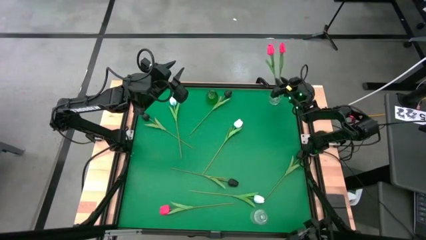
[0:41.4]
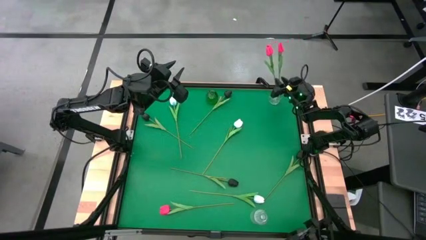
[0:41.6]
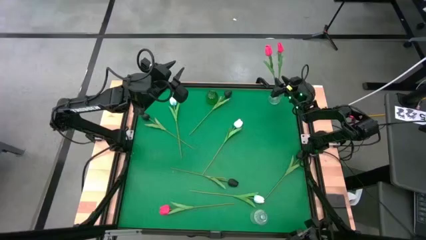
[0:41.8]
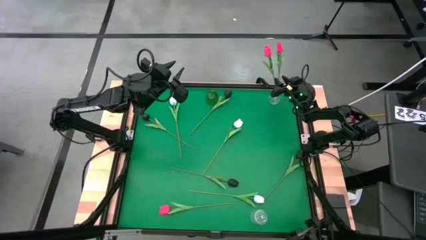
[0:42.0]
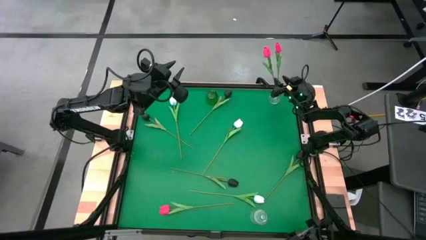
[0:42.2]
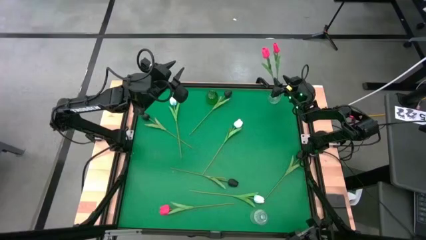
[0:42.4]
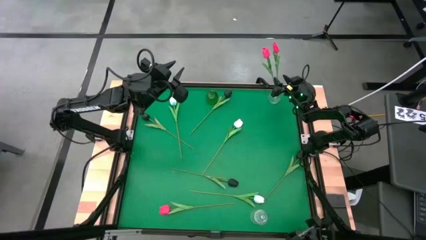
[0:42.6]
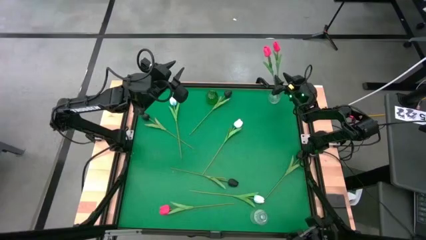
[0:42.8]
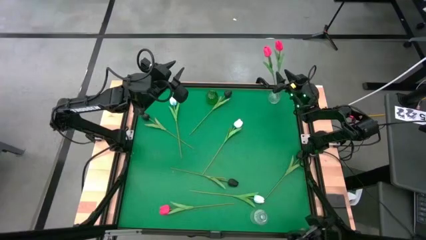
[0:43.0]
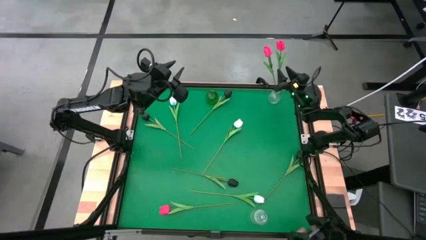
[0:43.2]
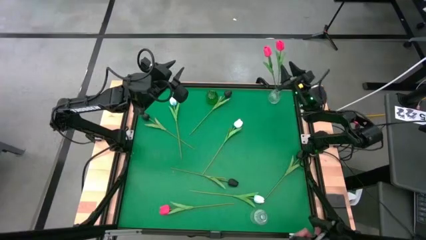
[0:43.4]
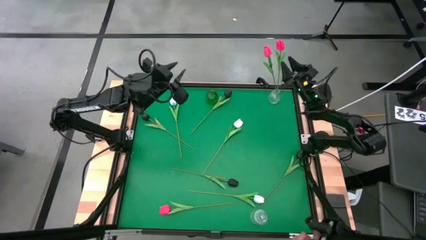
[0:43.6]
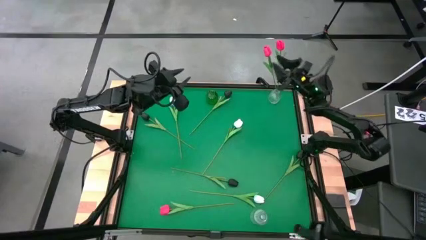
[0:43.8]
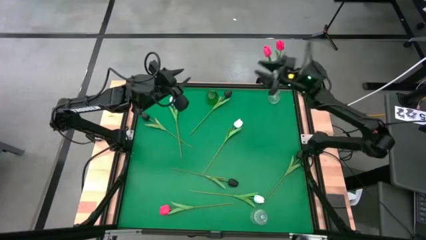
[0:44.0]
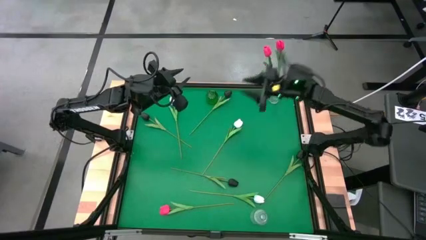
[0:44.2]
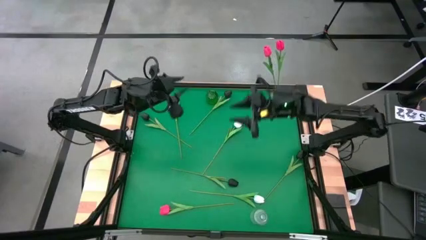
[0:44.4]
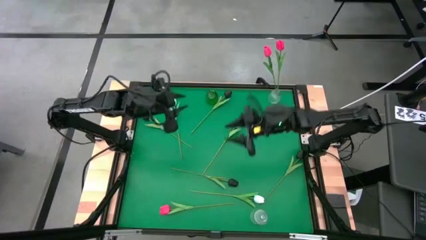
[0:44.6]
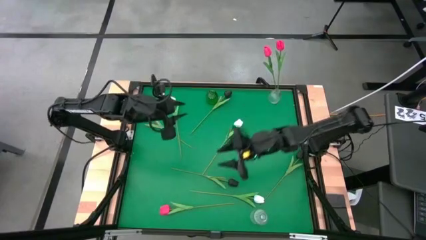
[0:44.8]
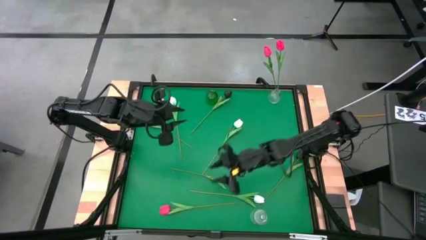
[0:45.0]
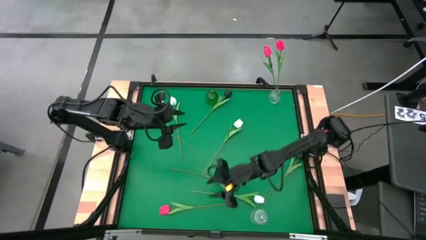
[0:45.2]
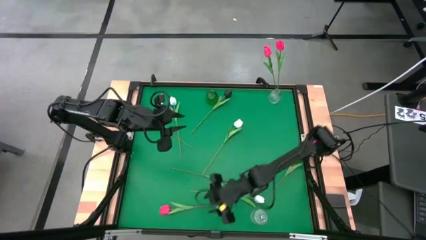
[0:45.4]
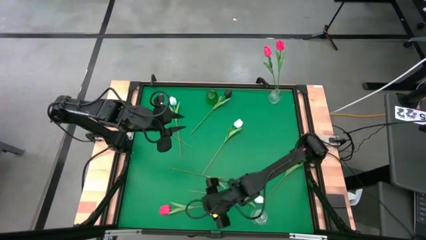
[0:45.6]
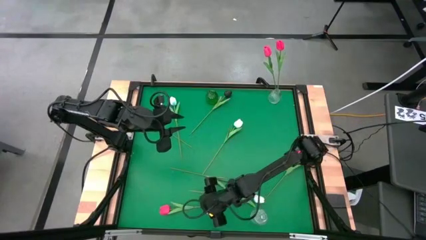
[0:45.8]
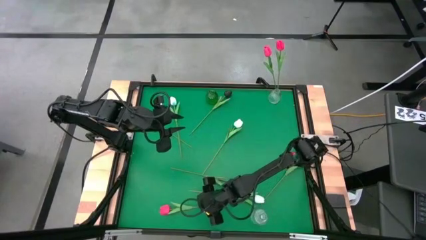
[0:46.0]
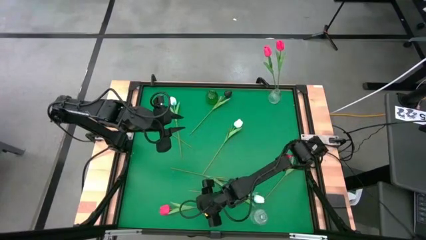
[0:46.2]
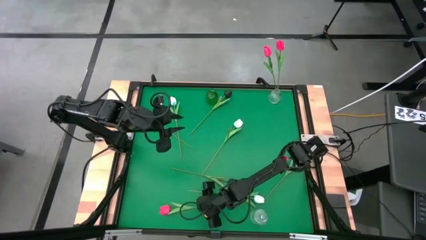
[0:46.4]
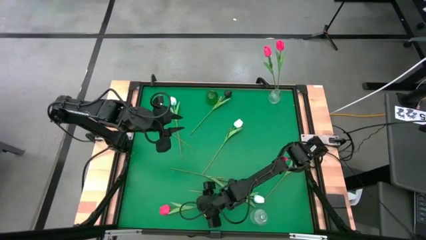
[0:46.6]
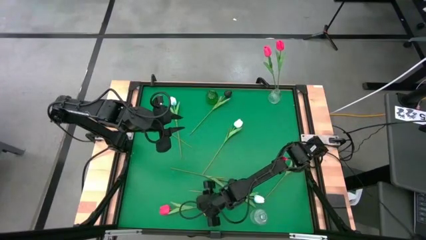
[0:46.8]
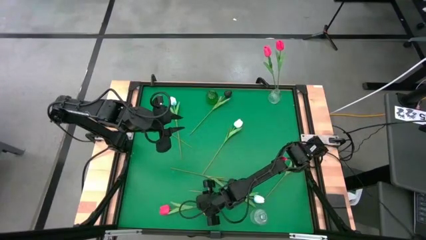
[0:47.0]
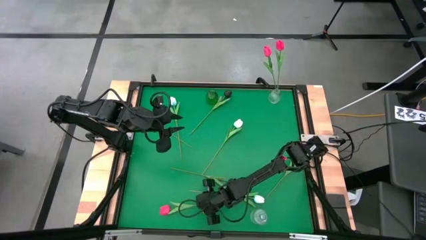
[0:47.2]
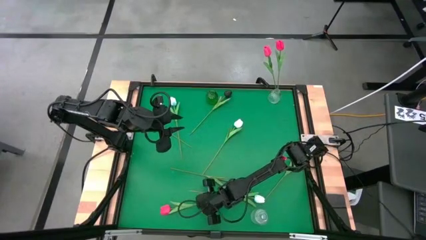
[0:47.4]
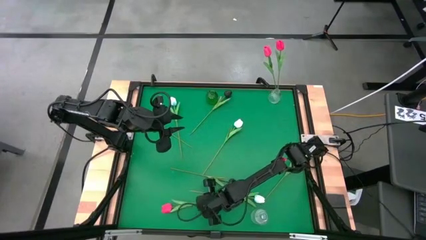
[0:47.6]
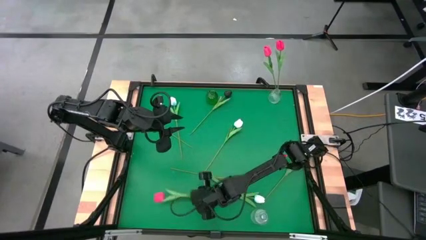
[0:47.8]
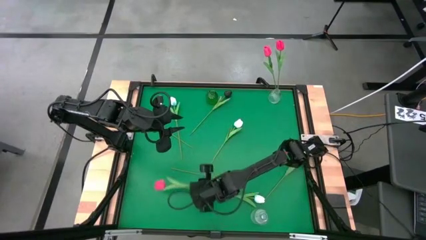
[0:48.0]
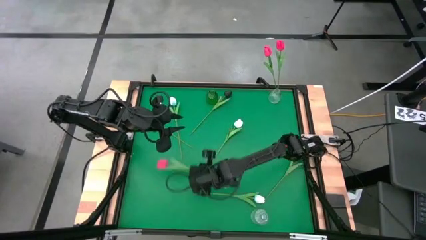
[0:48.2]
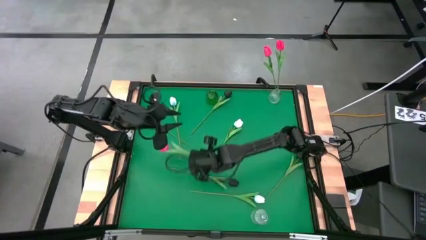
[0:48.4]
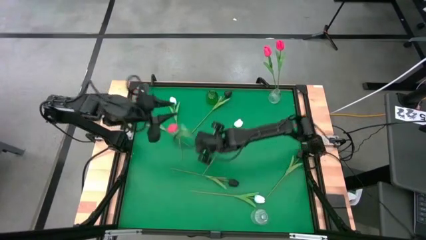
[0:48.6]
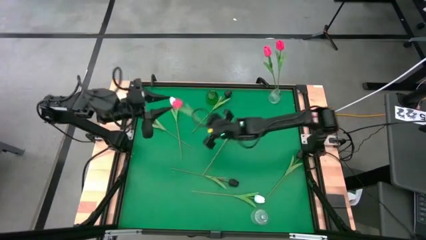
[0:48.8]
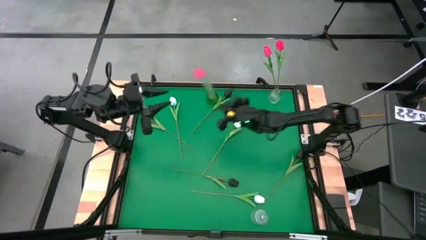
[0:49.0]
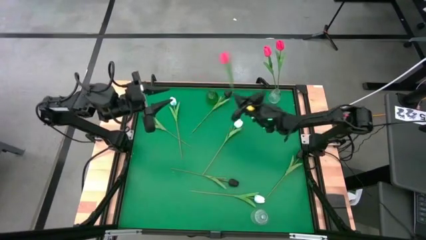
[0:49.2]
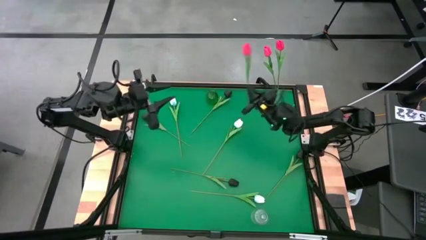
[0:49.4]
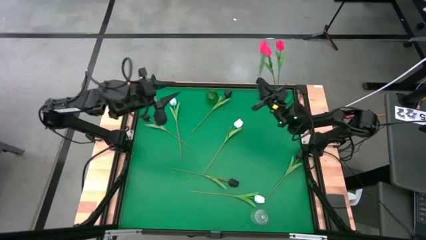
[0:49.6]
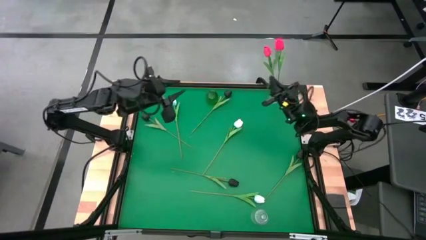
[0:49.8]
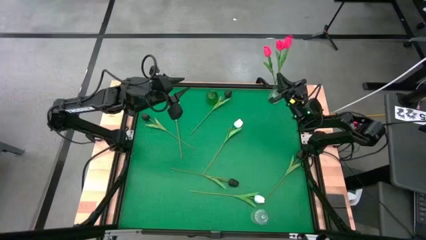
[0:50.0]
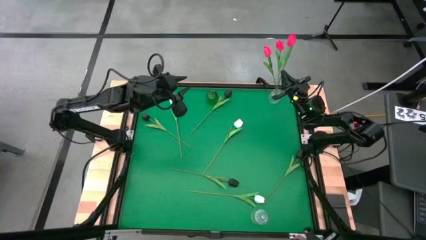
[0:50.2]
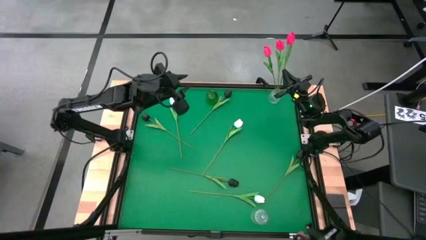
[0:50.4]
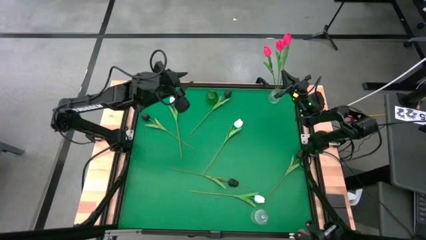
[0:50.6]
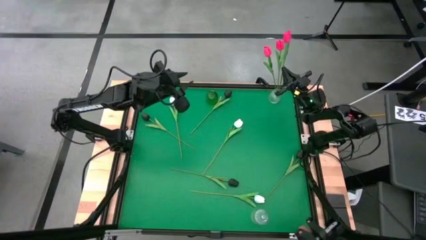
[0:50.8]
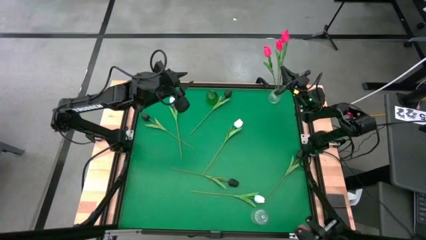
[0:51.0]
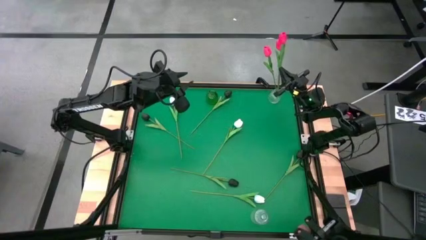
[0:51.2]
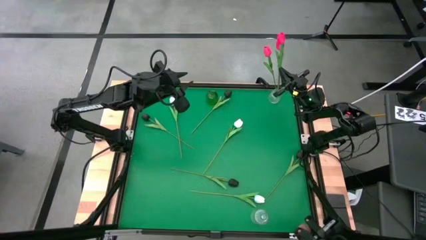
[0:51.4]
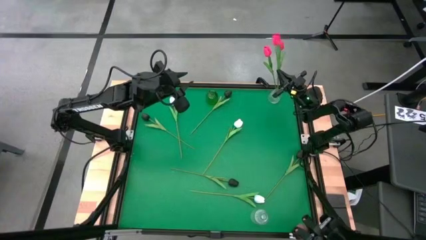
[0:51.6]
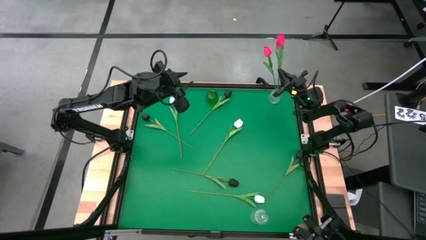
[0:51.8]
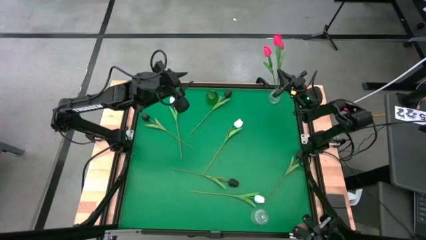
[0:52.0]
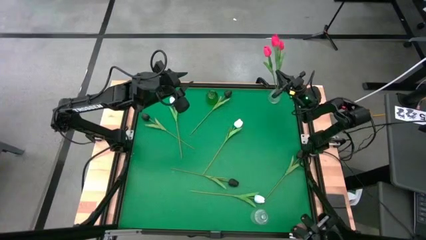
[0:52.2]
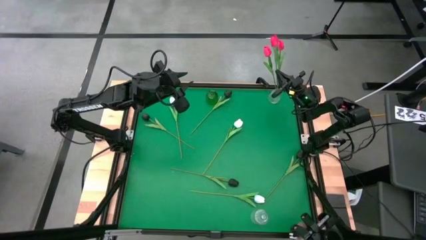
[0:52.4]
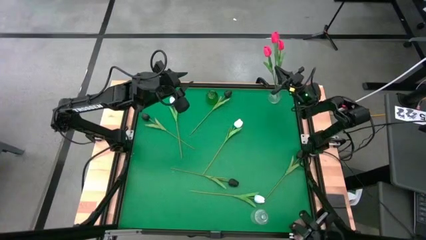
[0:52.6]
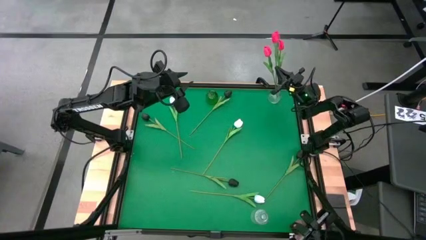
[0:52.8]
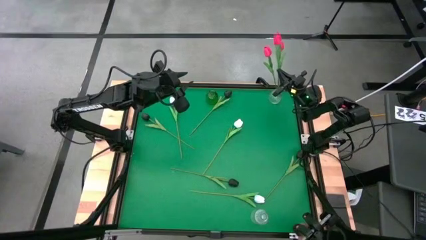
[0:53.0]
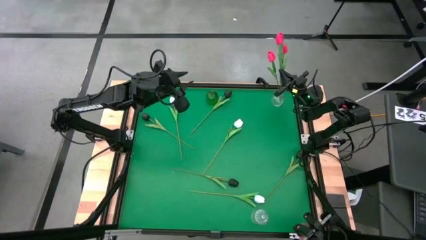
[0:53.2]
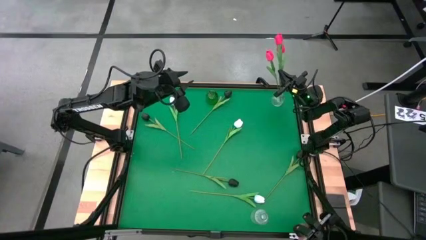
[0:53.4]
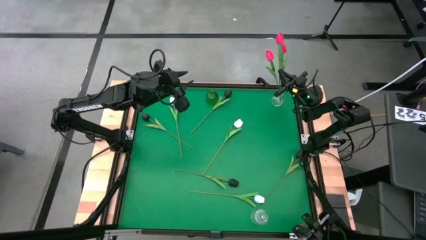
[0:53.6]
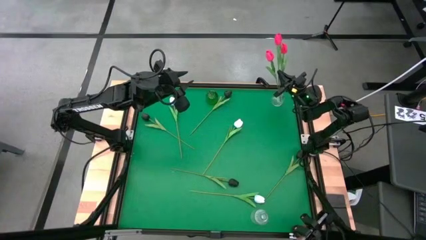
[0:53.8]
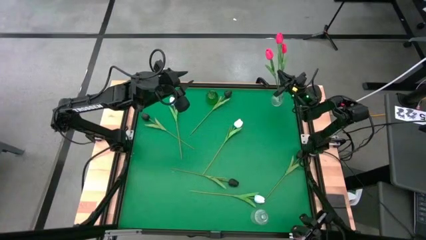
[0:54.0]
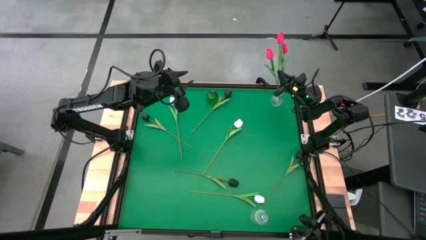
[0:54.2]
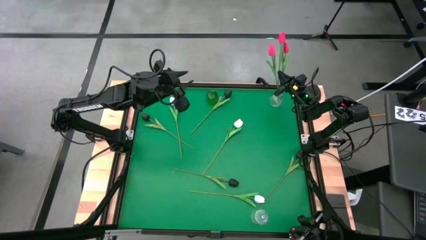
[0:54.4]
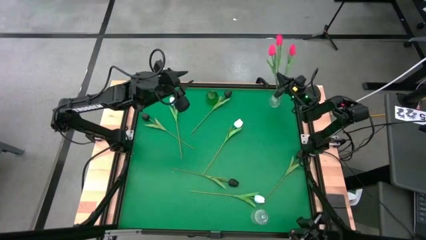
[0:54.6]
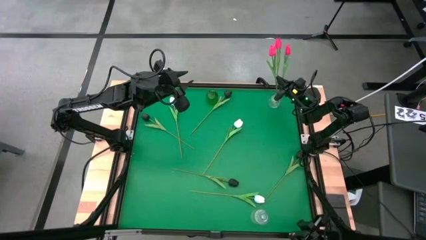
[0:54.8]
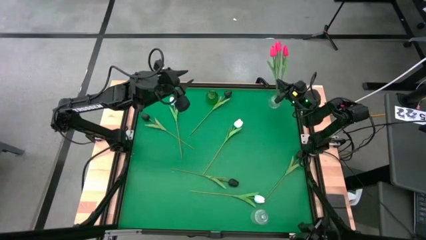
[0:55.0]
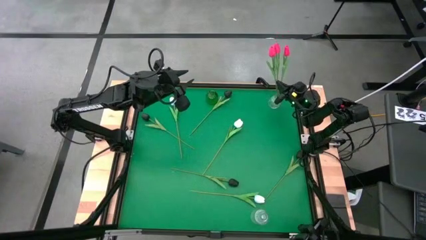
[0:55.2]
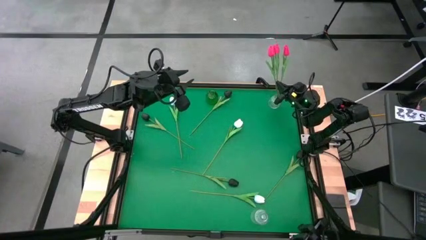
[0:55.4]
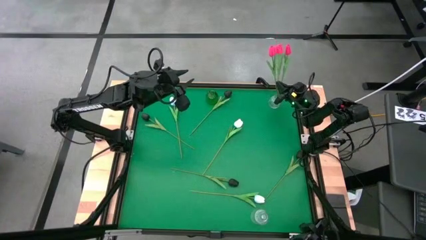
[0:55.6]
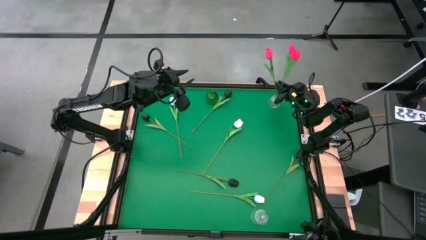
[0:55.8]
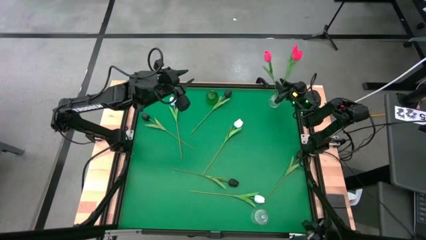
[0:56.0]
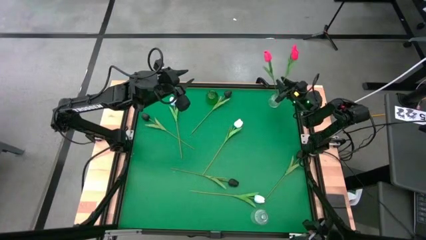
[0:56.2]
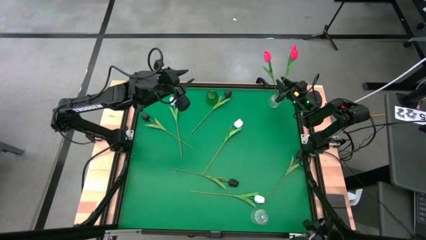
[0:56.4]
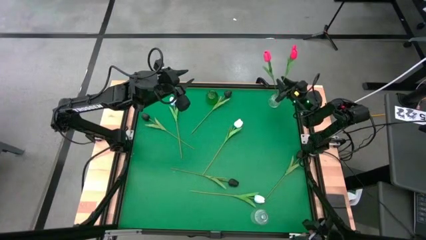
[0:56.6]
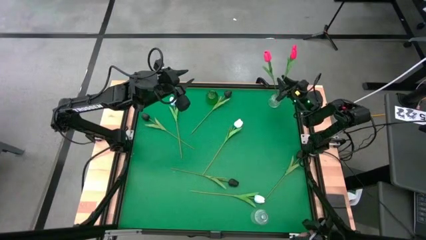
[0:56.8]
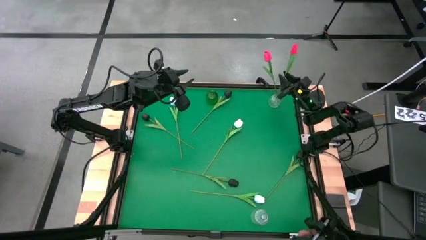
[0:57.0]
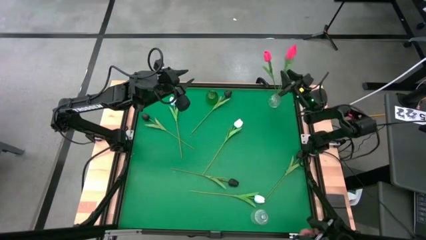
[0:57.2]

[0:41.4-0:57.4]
Task: Sort flowers into vase by color
Put the pink tulip into the top transparent vase
